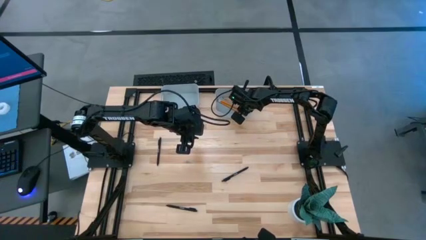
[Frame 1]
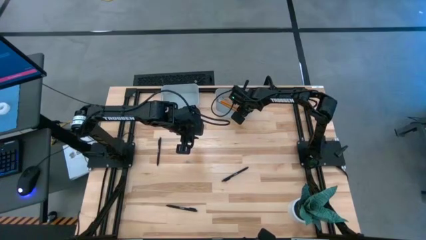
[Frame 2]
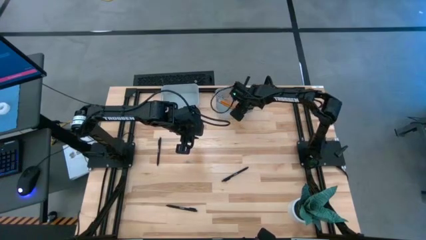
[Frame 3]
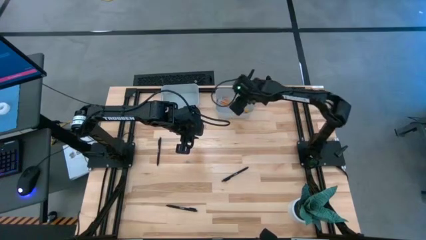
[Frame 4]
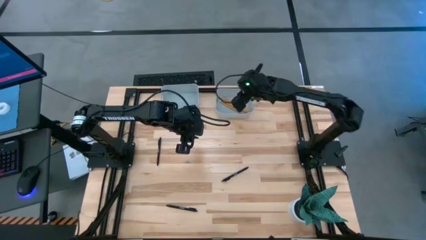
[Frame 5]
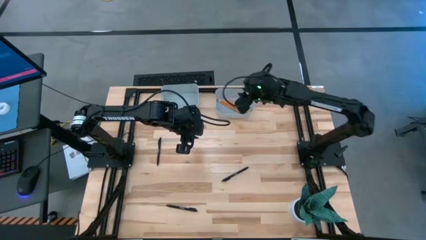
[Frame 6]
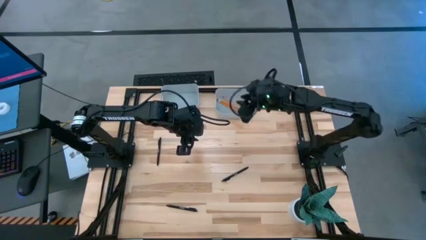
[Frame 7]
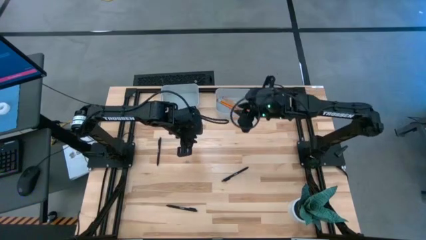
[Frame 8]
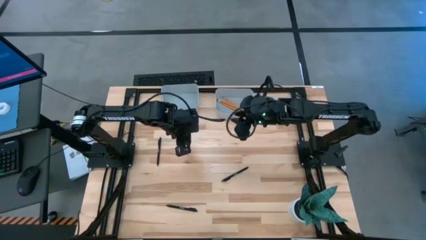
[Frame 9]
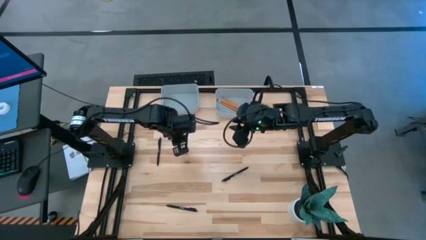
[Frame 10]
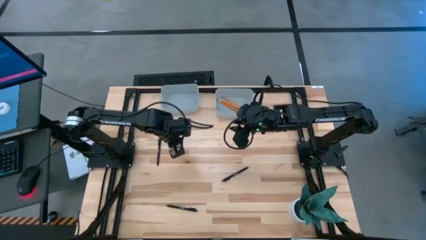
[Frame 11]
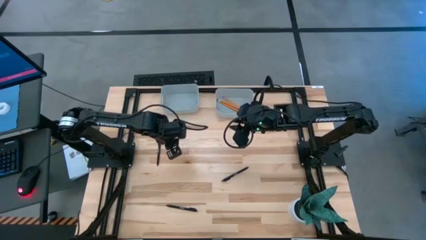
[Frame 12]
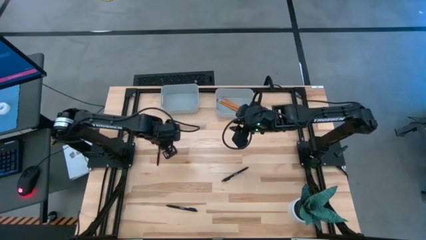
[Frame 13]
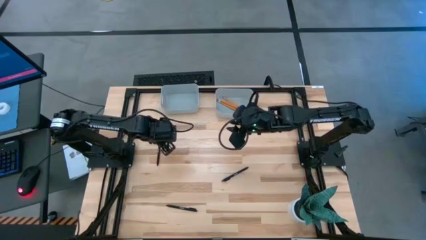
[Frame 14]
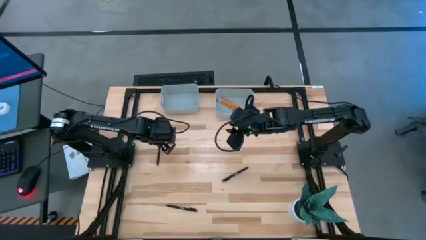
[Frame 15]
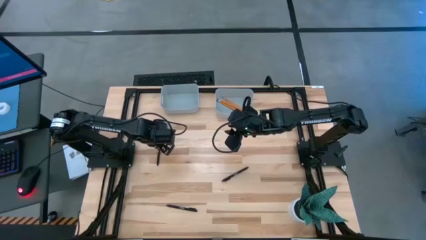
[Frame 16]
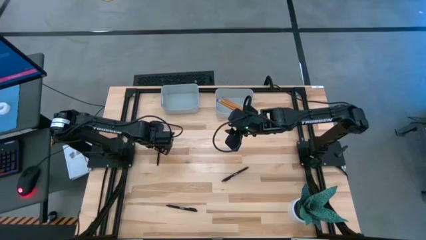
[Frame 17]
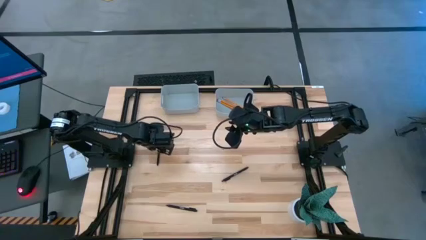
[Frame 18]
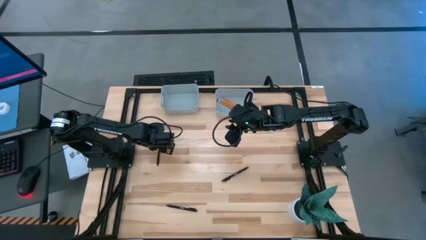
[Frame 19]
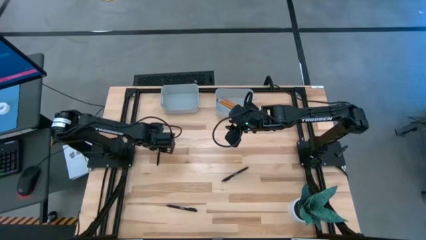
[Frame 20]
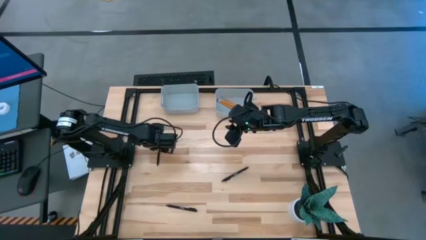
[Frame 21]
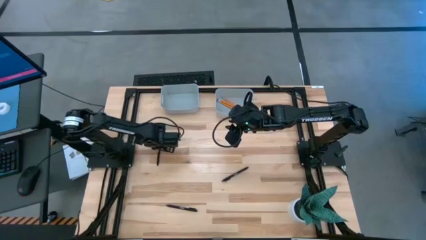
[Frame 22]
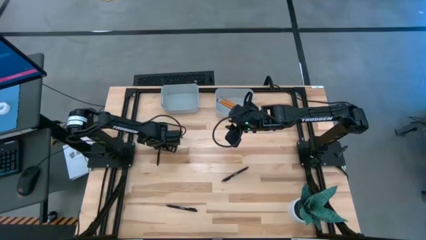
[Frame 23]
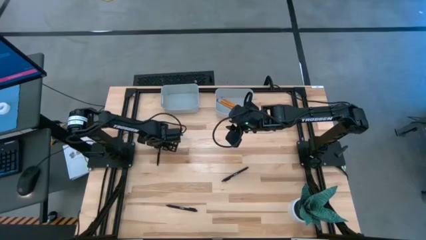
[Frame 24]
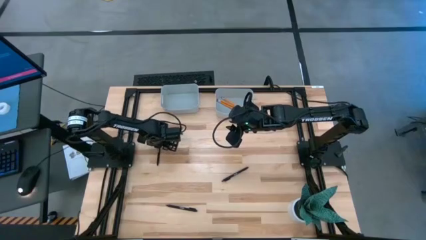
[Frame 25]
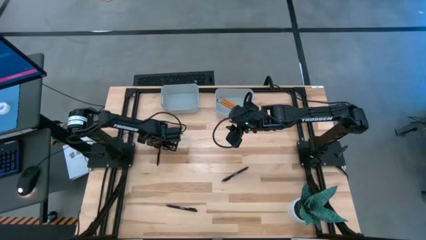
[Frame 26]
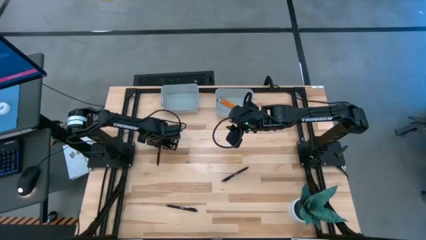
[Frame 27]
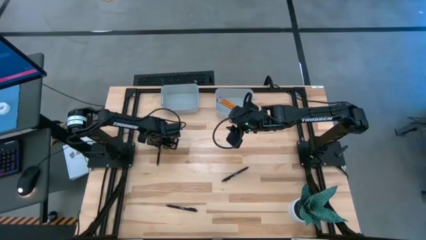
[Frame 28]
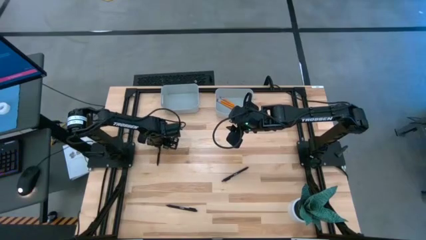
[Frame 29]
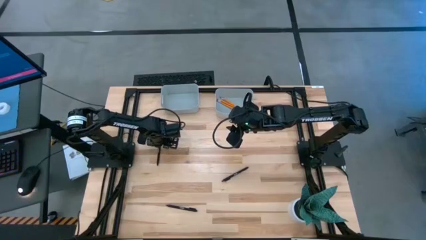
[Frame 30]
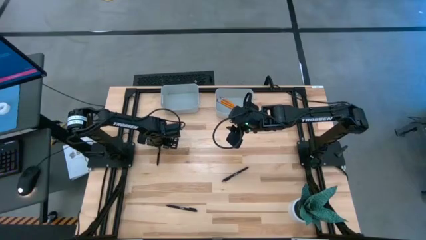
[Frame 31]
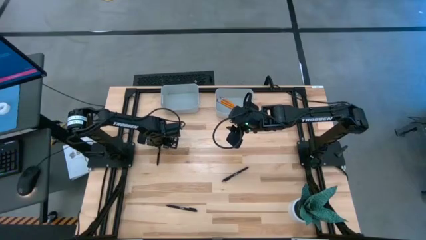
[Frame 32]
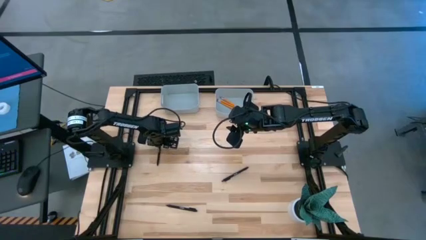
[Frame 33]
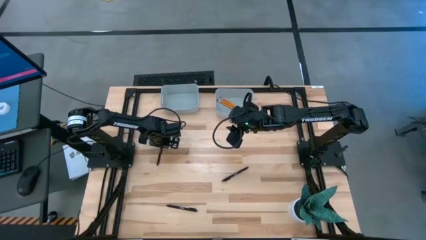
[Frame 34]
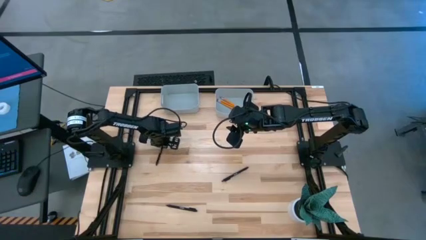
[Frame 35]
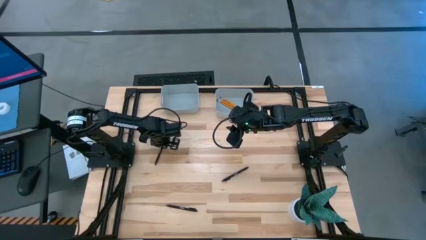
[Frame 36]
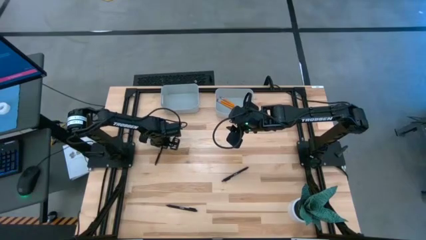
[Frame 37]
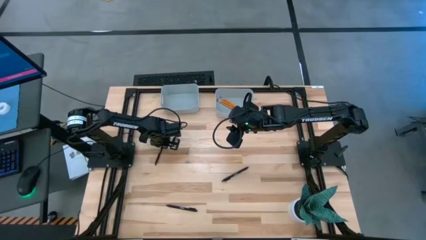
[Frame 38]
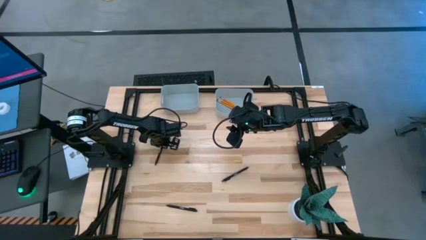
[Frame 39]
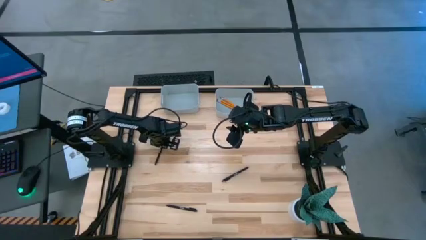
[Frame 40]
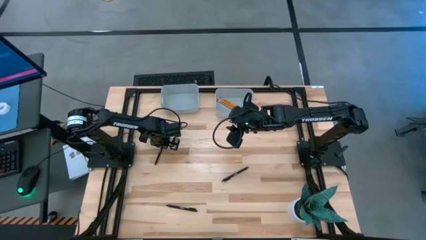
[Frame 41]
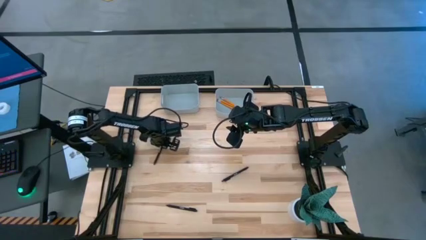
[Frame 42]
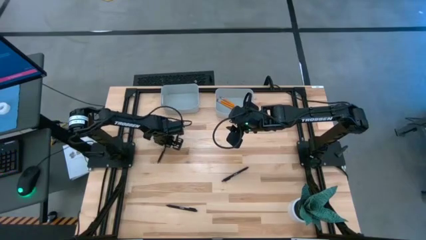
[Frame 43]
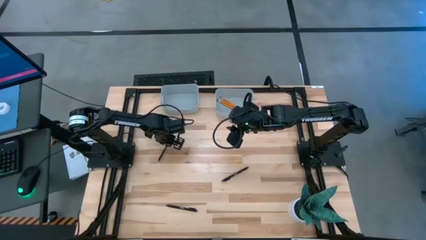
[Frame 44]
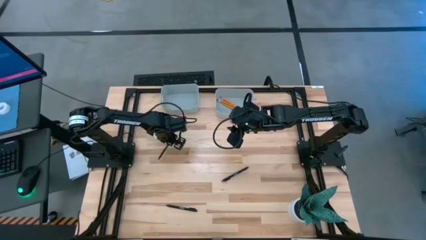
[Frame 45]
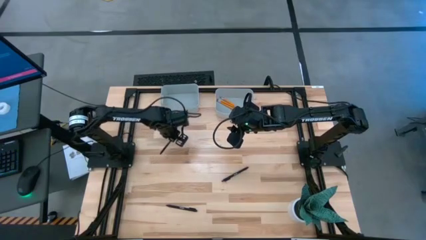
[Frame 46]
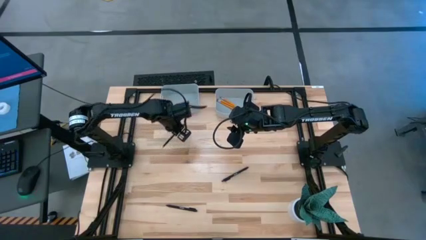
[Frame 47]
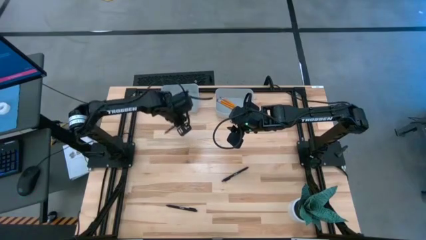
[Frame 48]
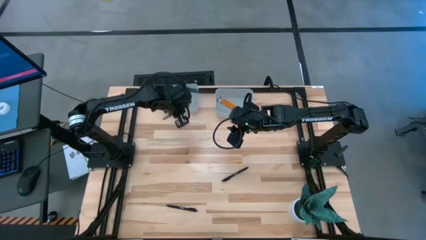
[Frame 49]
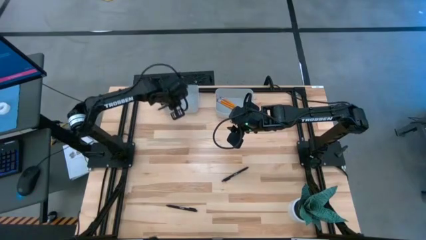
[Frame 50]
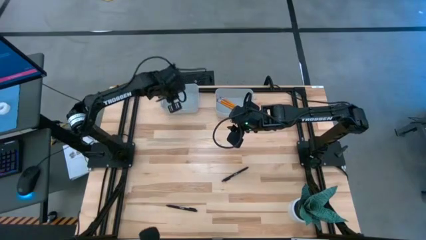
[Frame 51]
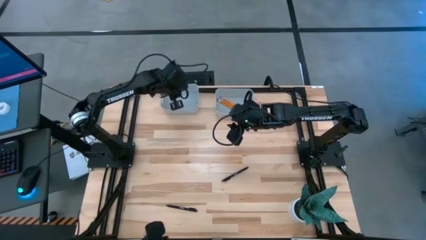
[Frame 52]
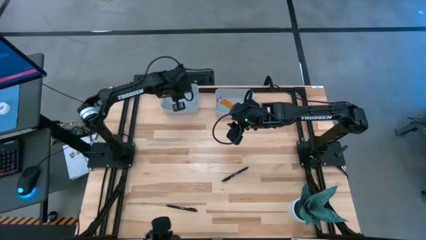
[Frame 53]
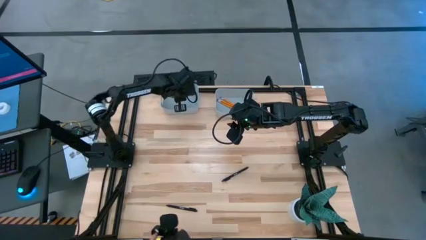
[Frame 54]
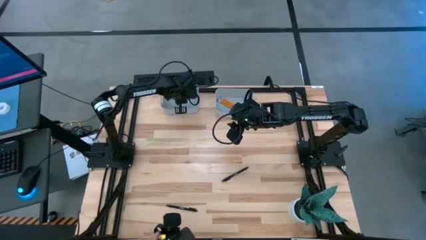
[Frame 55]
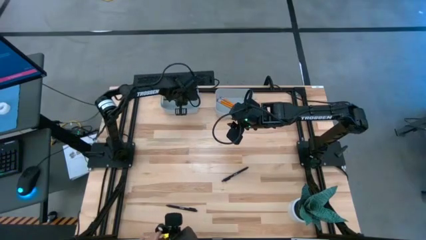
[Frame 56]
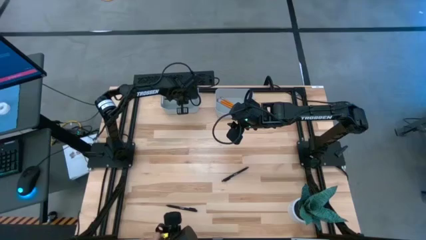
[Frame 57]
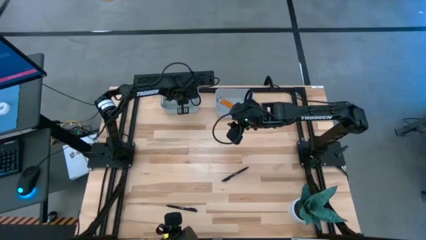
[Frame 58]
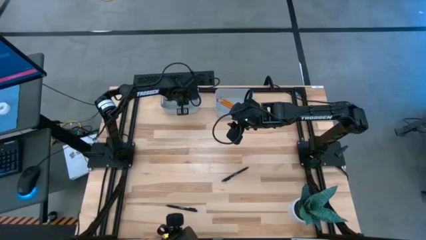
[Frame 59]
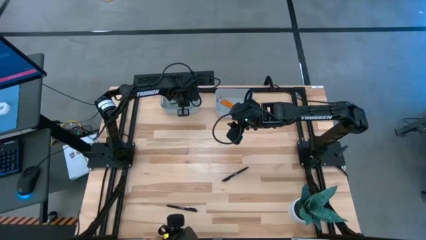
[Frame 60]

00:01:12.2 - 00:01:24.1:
Task: Sort pens & pencils
Put the top left black pen into the left gray bin
